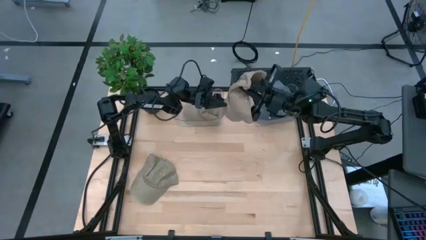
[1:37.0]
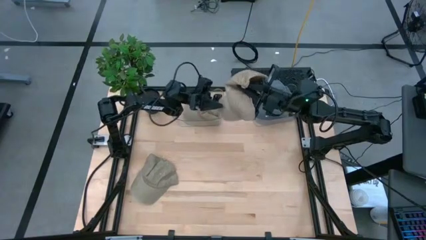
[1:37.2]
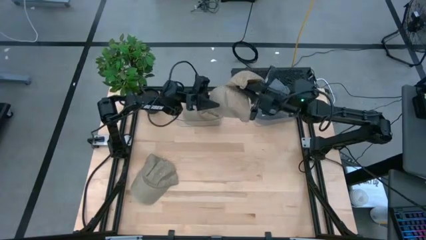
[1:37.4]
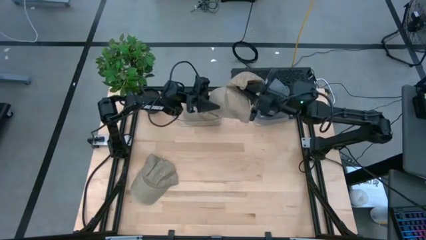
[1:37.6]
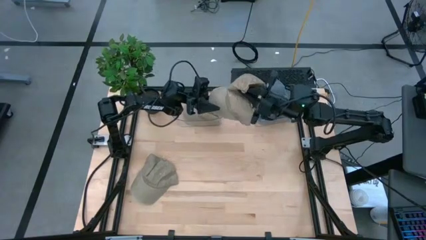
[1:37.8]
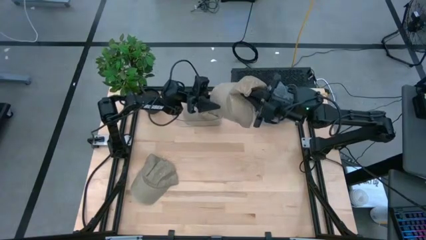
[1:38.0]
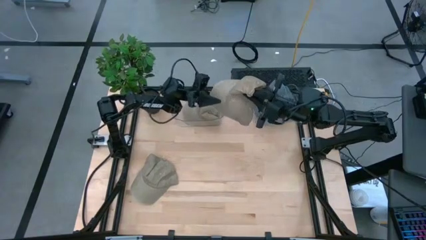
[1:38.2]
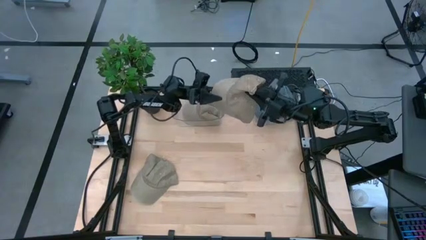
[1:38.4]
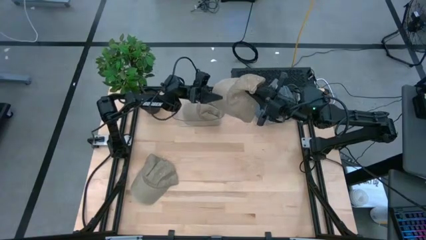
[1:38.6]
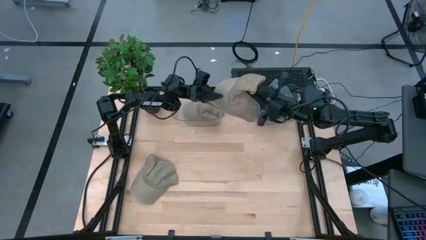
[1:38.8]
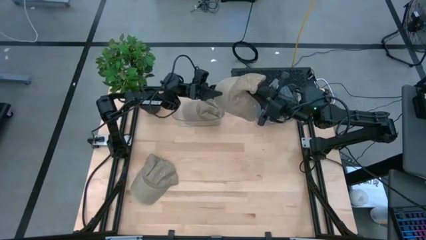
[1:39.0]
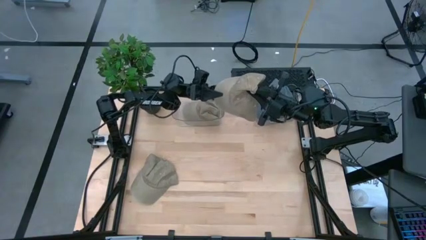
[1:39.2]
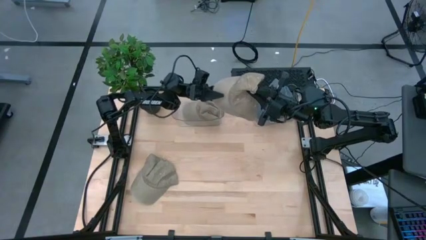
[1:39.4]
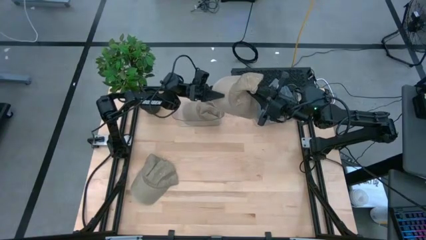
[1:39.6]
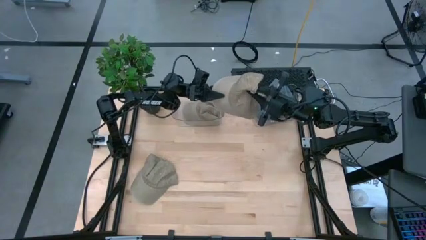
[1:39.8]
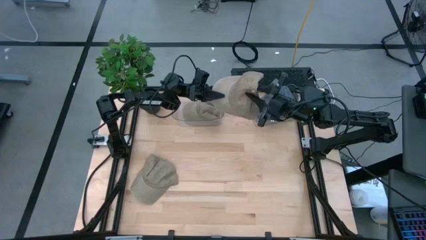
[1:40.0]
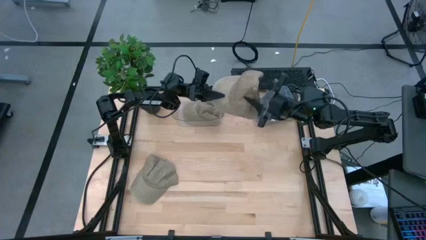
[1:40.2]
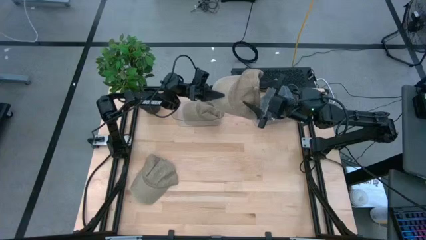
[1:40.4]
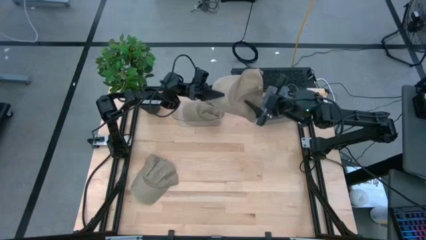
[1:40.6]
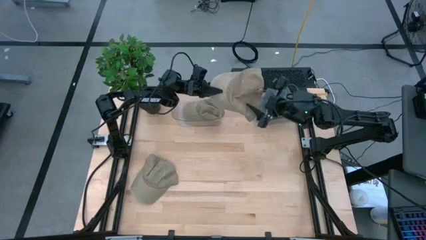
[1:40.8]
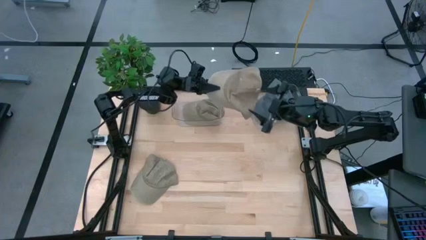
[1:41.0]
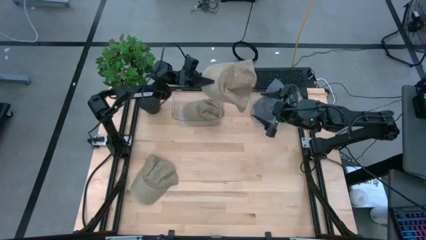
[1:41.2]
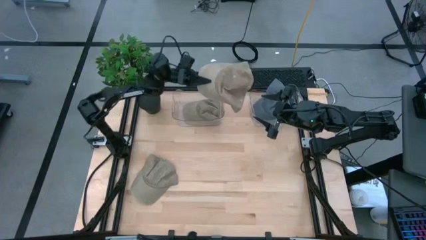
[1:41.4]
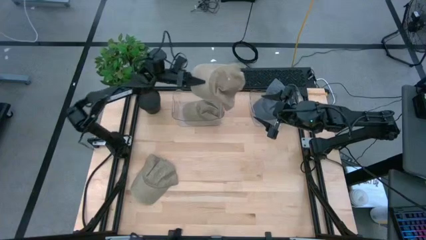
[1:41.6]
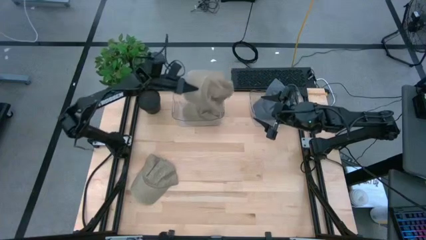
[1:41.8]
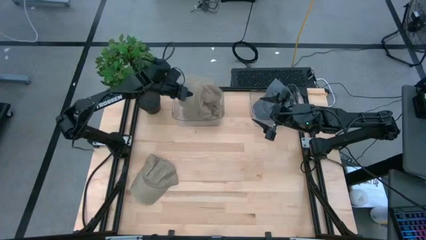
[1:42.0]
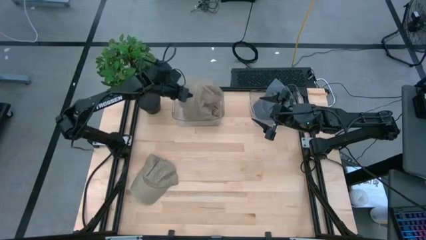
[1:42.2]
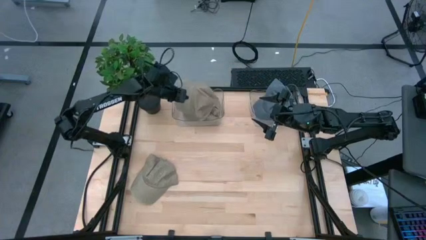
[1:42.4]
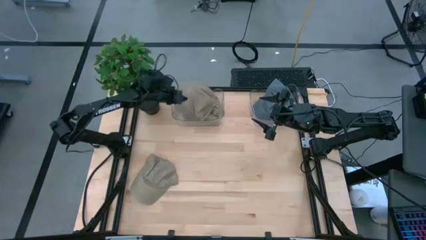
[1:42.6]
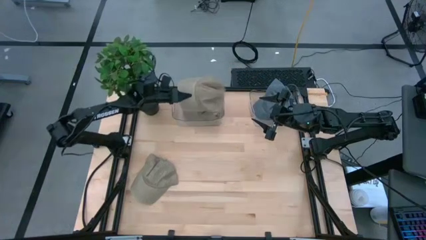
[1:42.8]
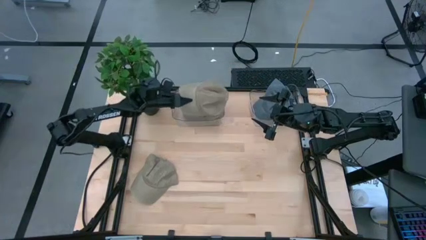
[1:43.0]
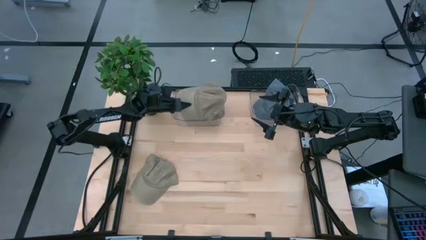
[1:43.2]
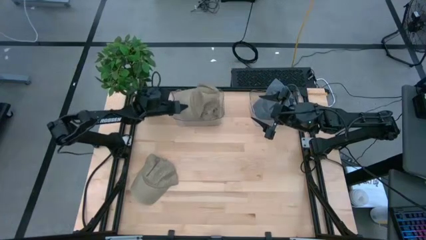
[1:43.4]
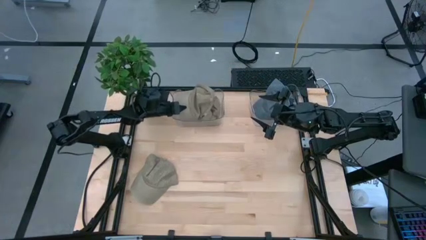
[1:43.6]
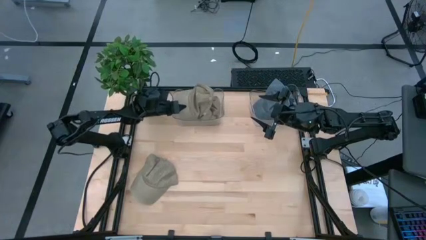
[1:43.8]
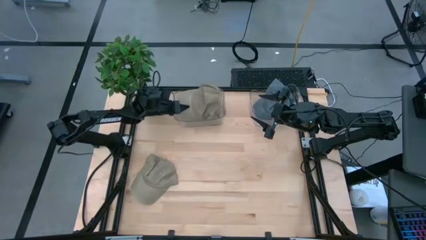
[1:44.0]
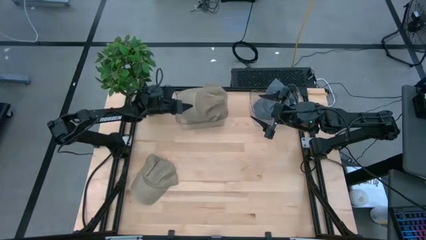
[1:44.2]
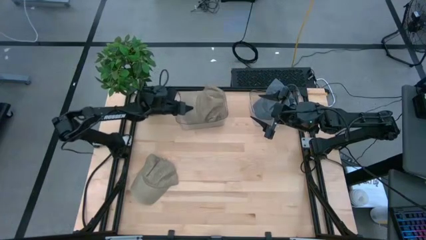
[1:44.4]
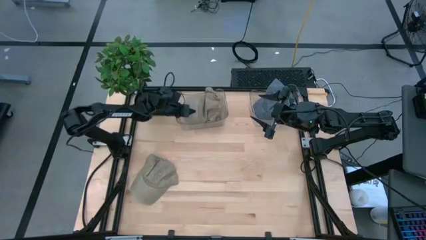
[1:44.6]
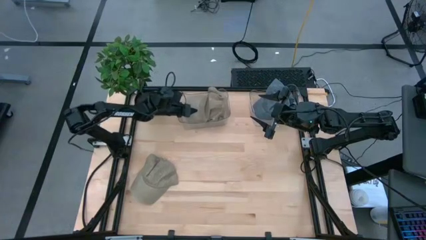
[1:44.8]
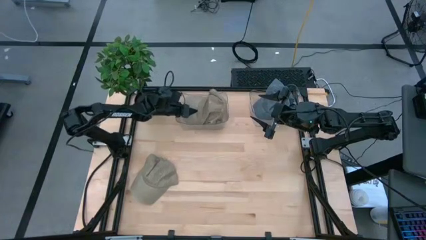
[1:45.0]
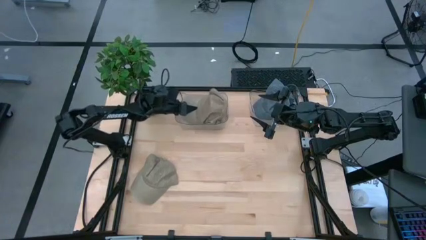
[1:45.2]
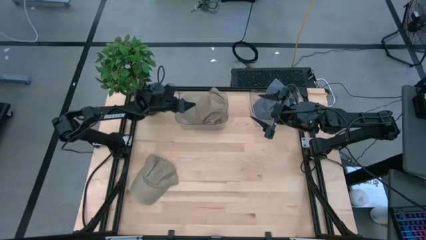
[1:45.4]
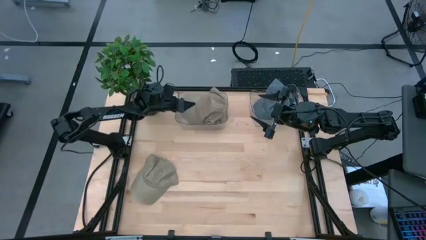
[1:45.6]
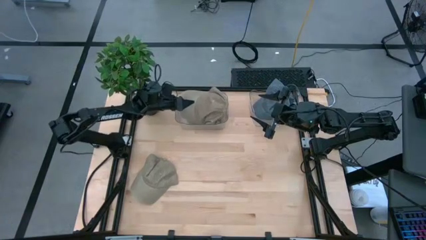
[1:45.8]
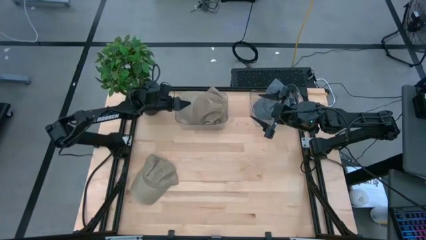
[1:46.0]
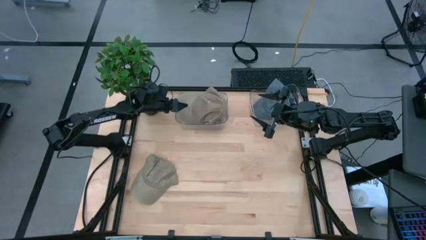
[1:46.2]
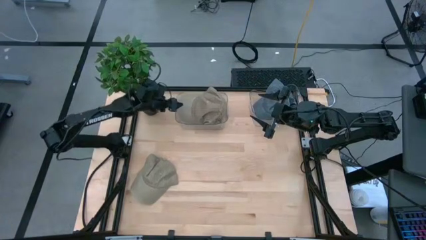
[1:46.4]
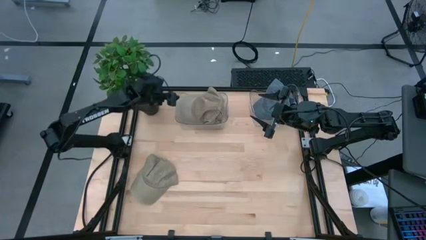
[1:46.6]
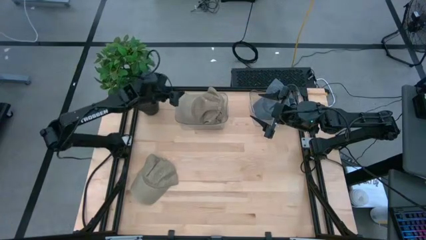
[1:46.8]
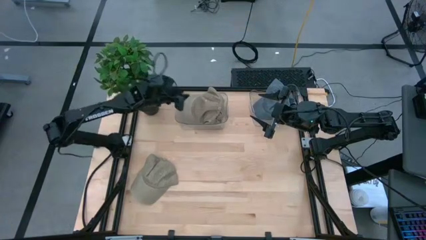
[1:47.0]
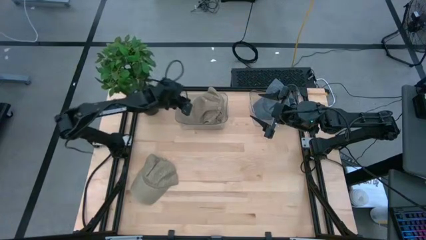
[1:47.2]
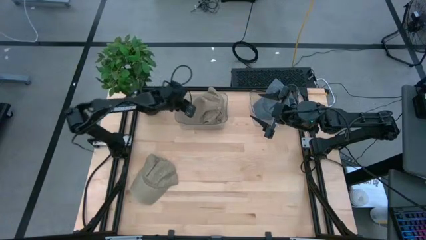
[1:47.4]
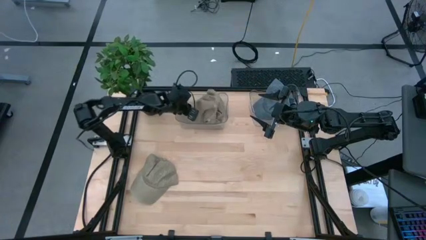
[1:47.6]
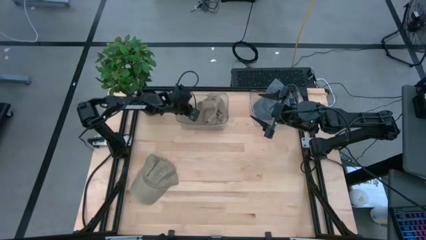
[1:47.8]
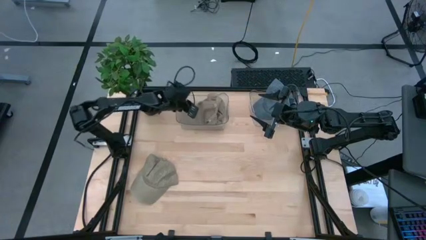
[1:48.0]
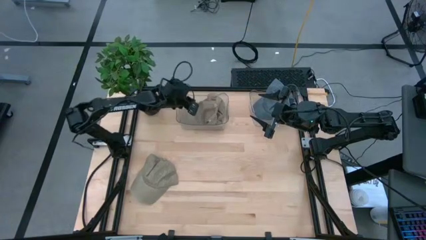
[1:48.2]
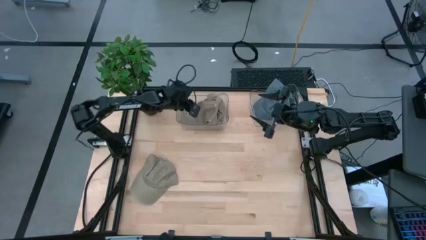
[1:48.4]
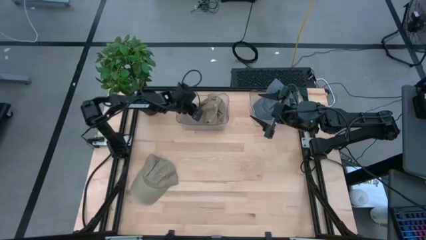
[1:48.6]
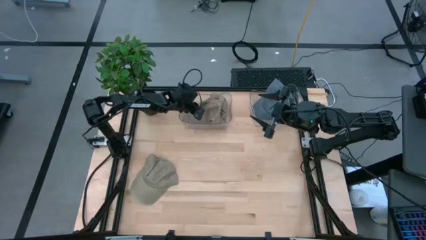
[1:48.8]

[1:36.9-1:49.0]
Task: Pick & Place hat
Put the right brown cap into the left transparent bin
